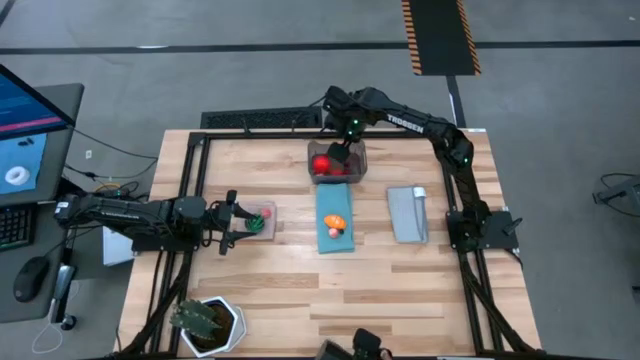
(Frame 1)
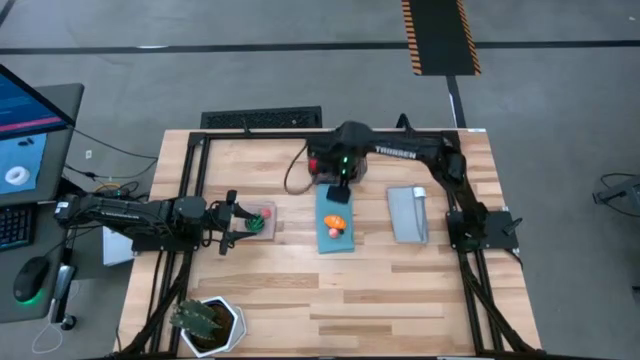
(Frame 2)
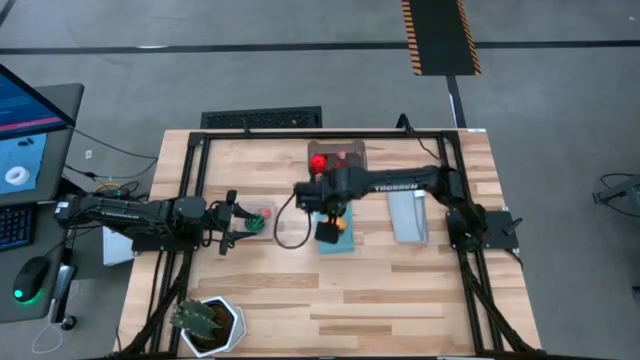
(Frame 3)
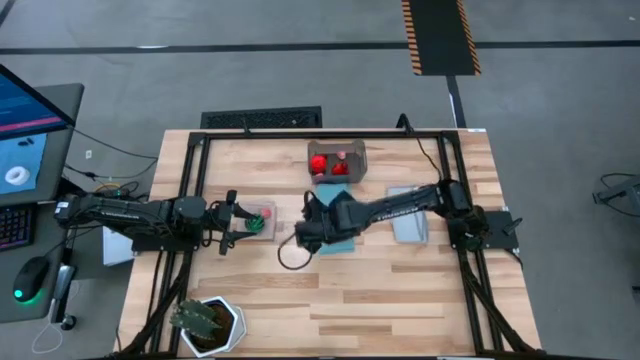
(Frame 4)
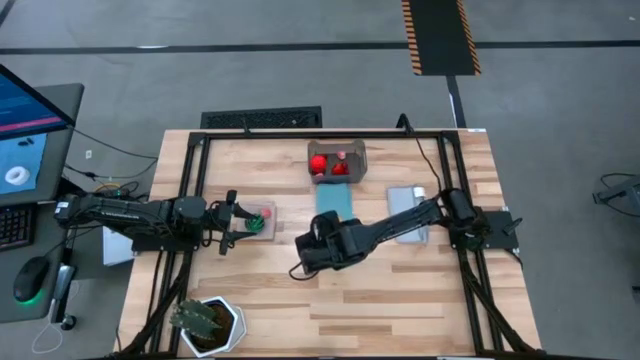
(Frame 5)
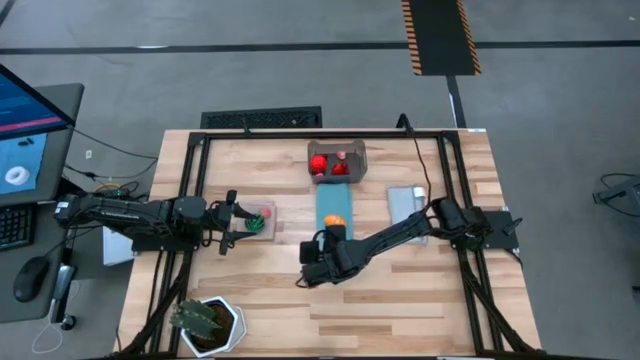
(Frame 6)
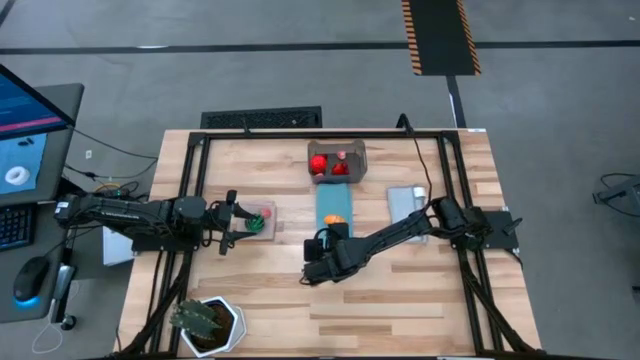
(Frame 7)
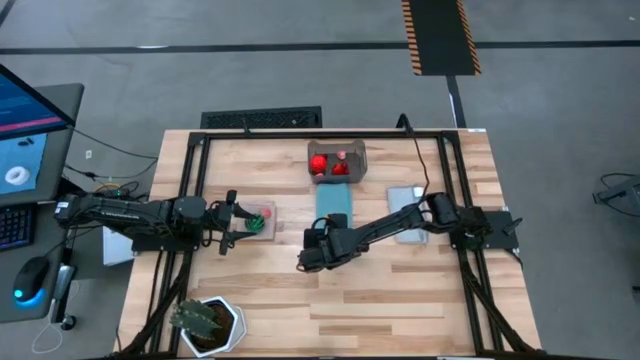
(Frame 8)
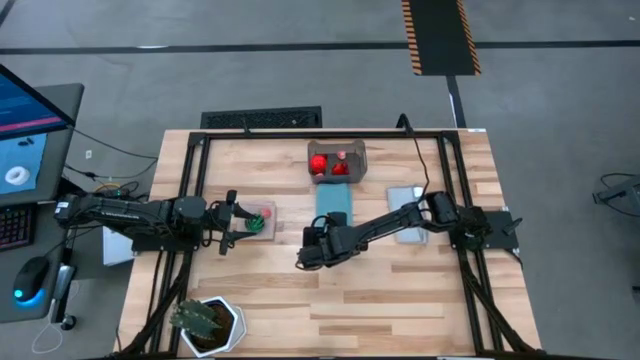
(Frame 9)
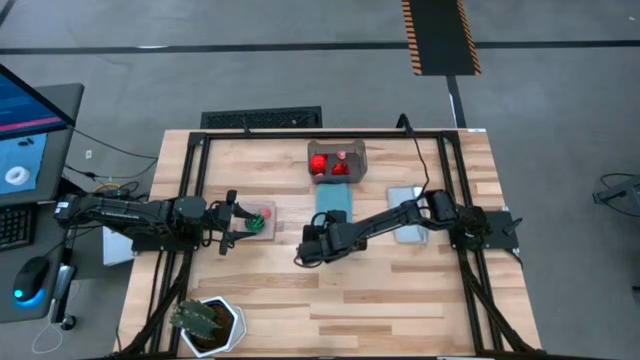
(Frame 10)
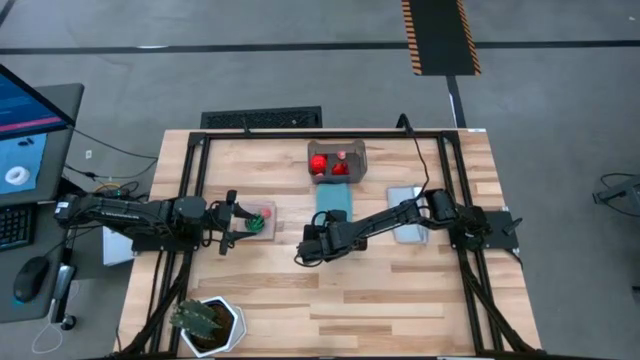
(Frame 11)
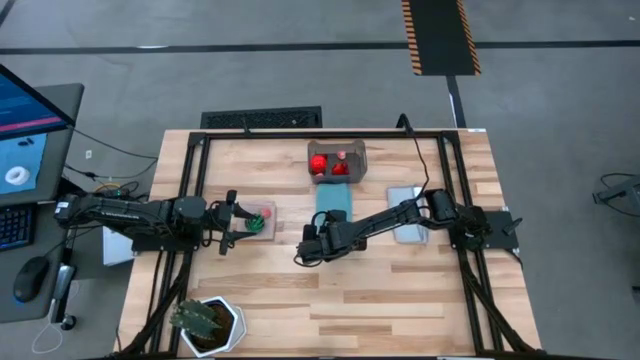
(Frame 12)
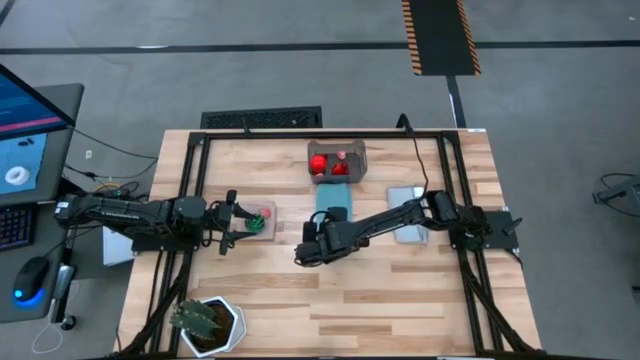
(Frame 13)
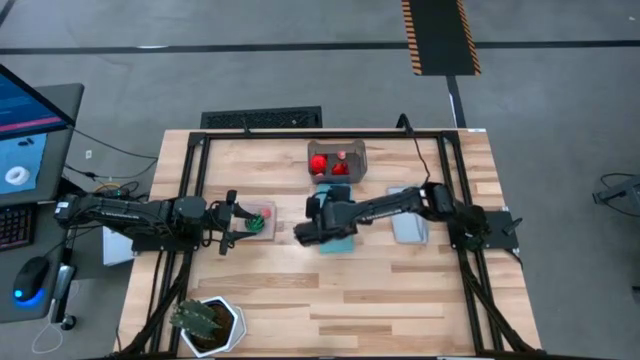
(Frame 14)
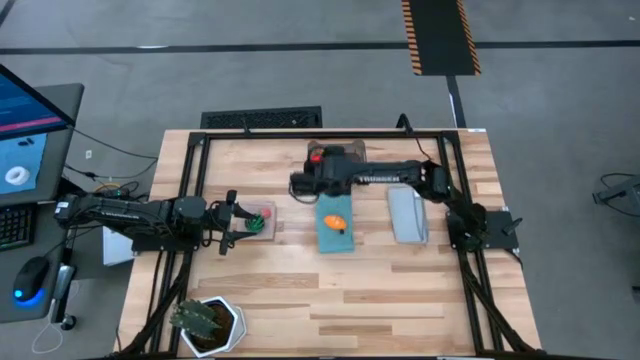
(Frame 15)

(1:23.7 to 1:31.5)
Task: Pick and placing Produce into tupperware
Put the pink peach into the gray bin

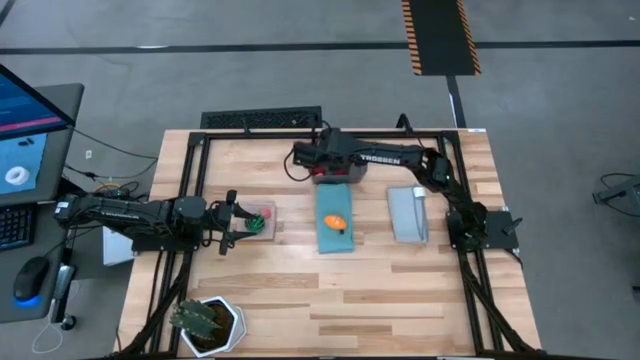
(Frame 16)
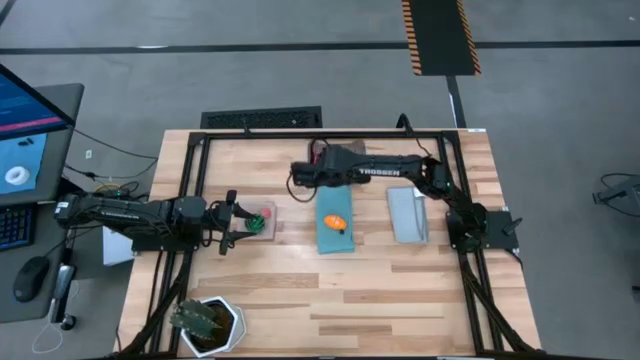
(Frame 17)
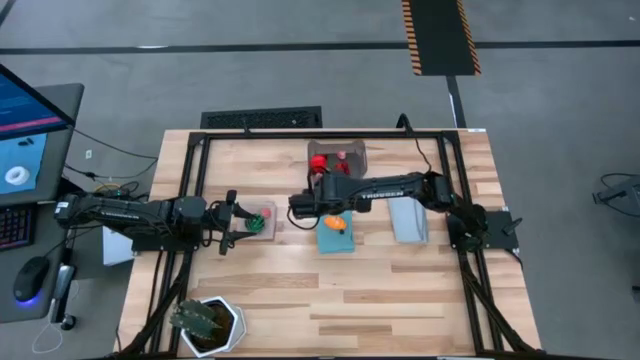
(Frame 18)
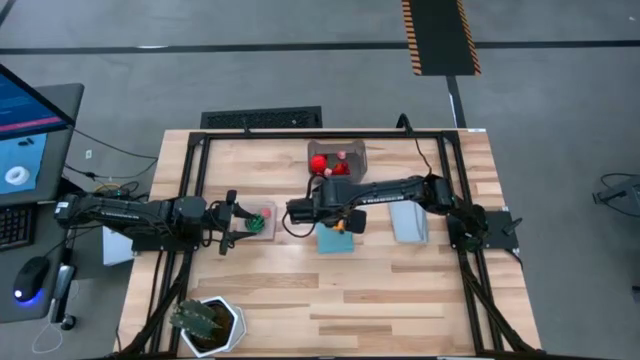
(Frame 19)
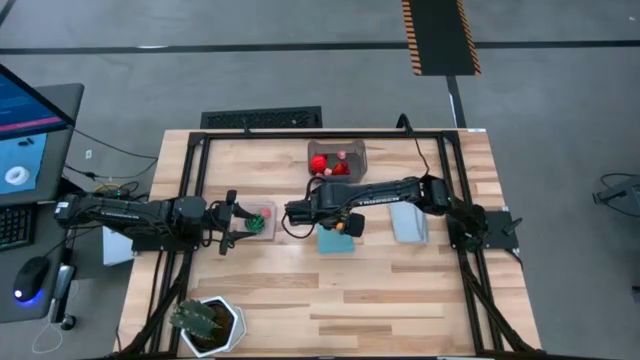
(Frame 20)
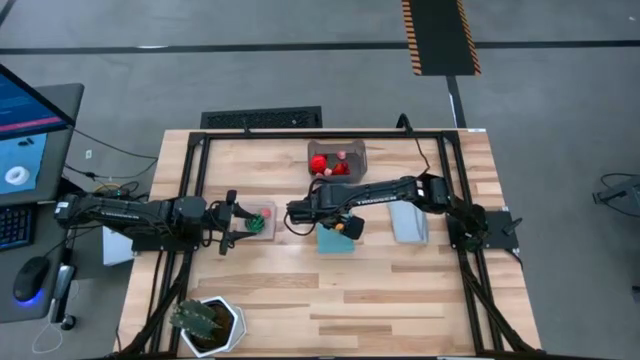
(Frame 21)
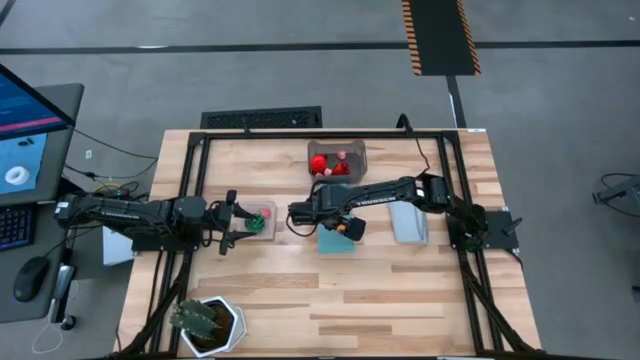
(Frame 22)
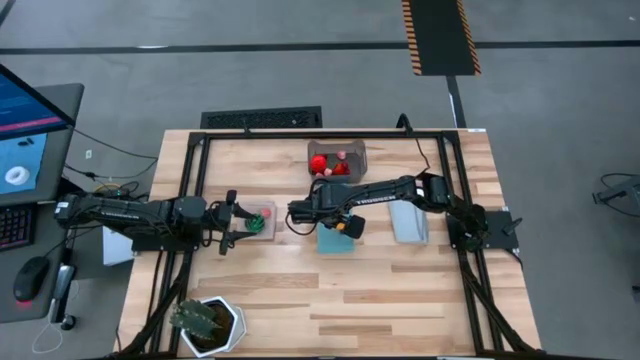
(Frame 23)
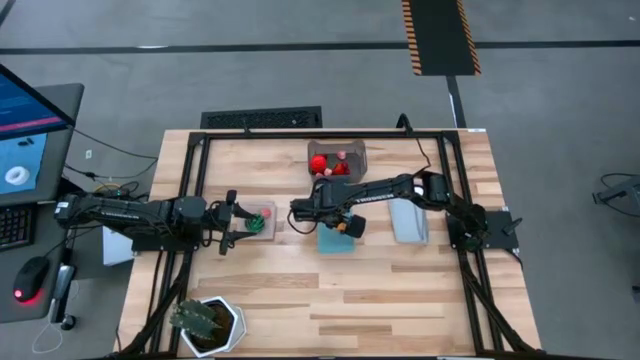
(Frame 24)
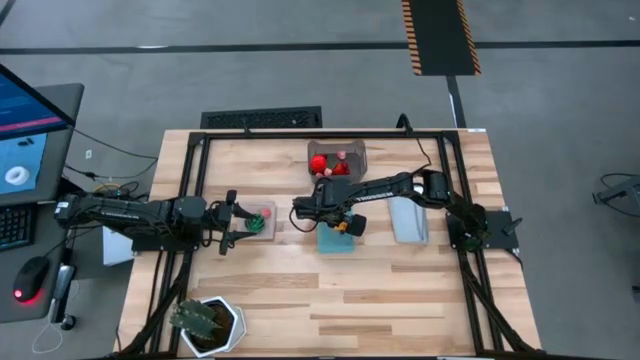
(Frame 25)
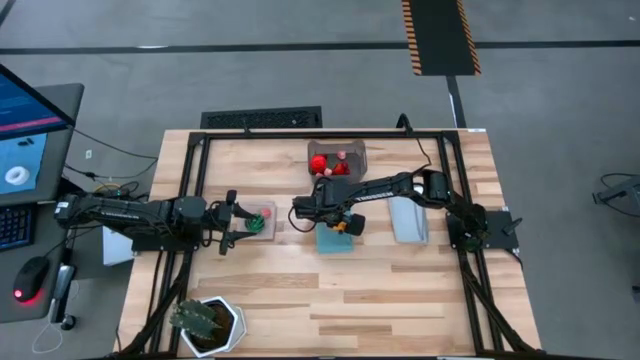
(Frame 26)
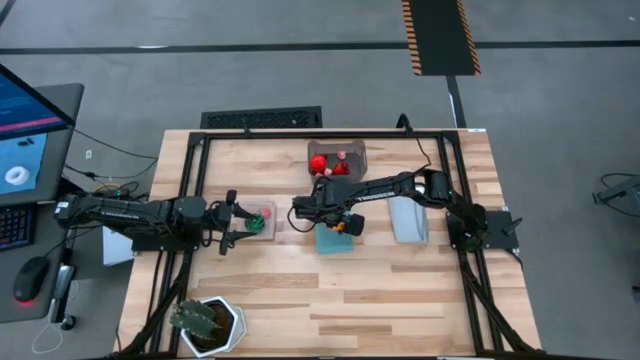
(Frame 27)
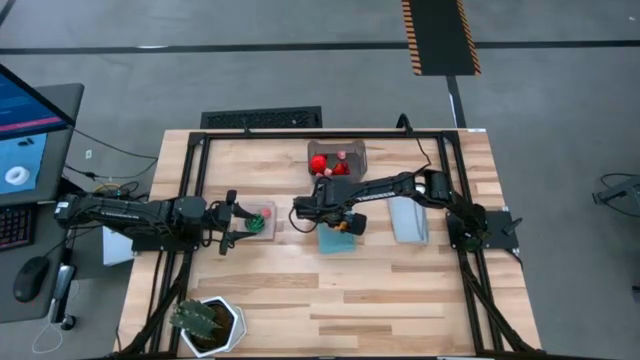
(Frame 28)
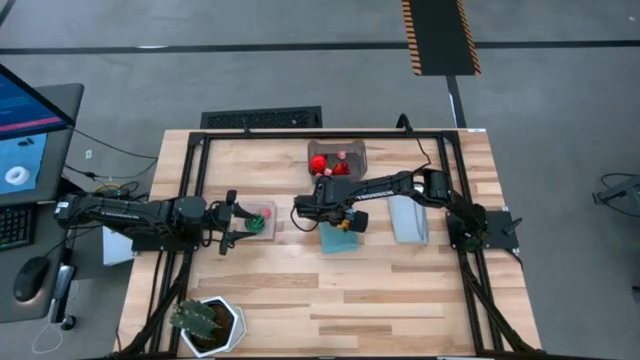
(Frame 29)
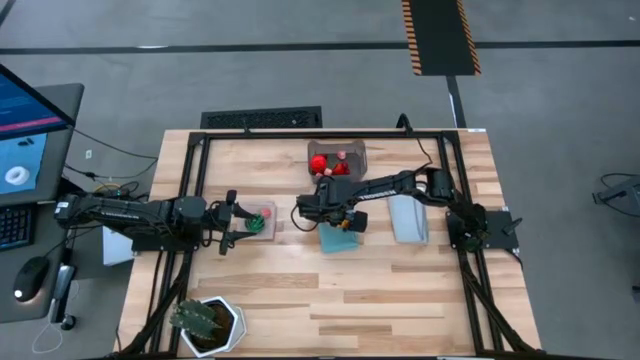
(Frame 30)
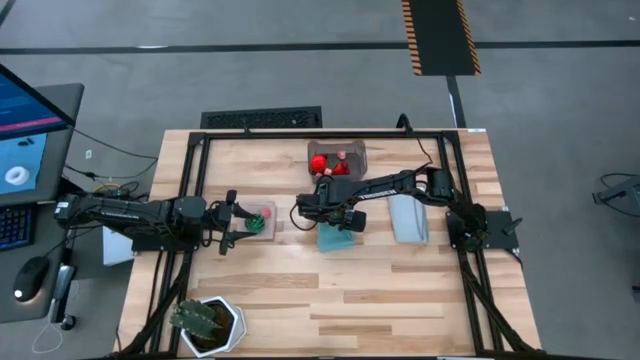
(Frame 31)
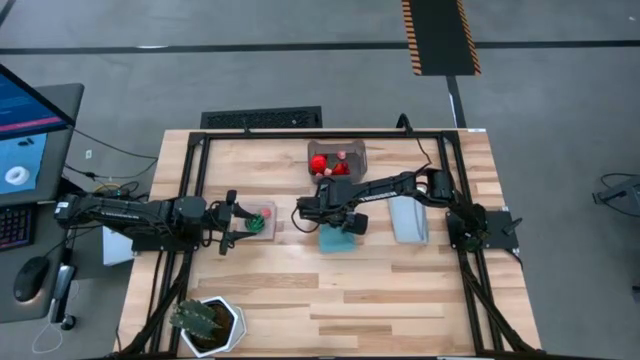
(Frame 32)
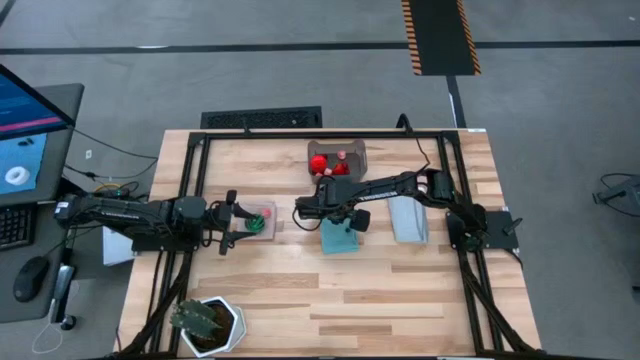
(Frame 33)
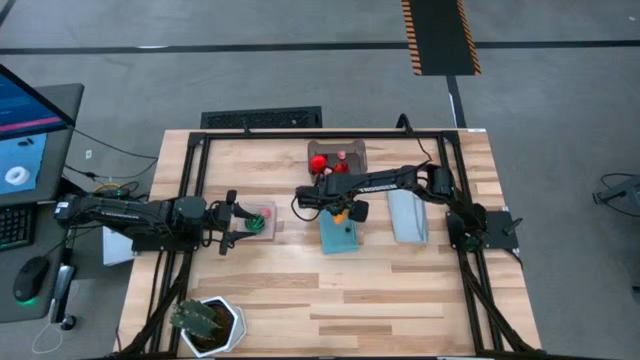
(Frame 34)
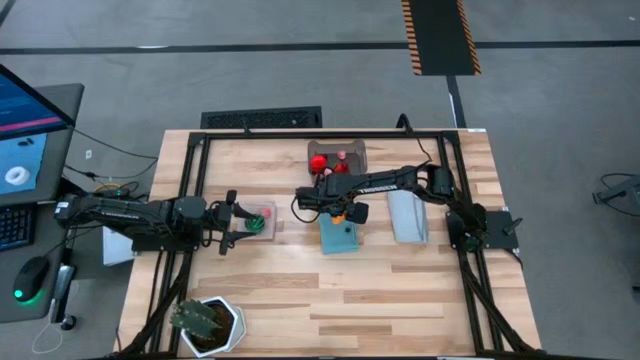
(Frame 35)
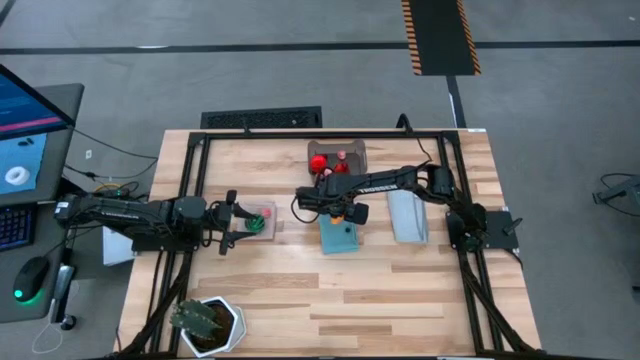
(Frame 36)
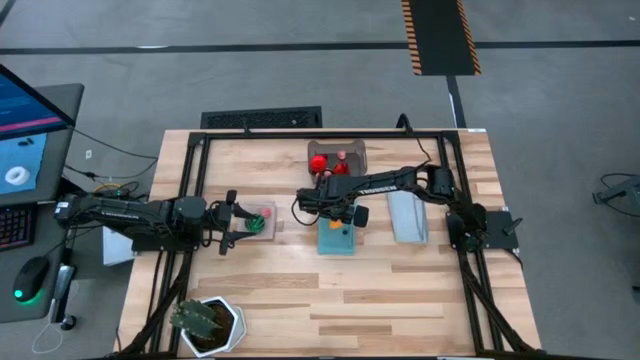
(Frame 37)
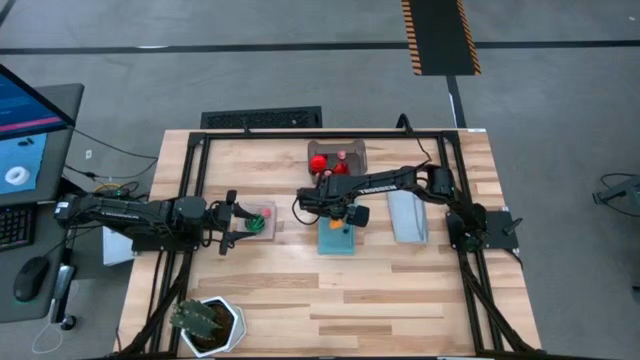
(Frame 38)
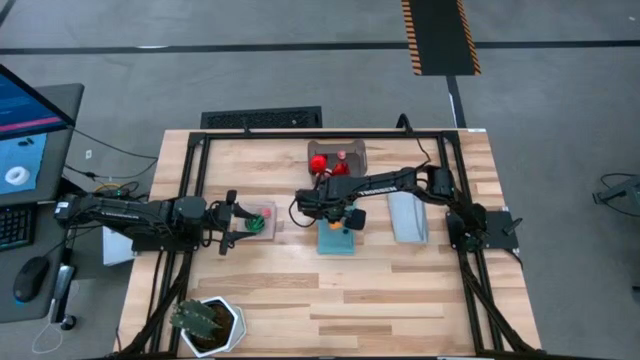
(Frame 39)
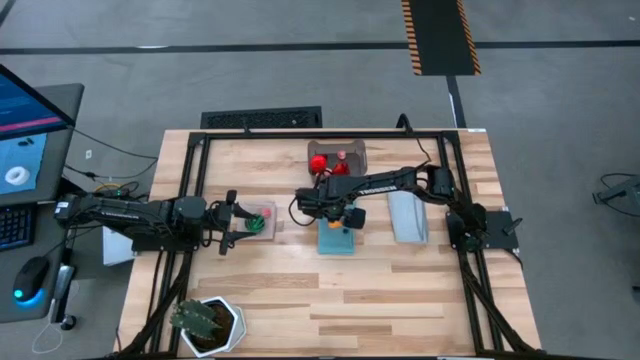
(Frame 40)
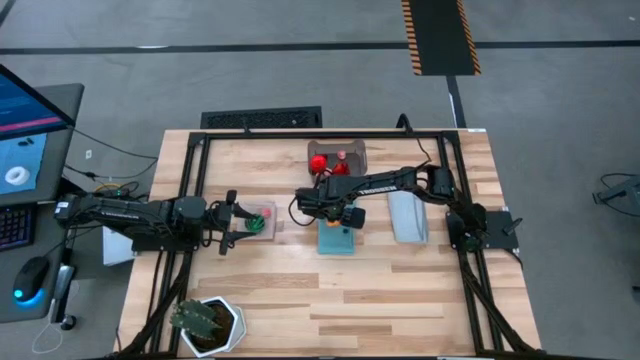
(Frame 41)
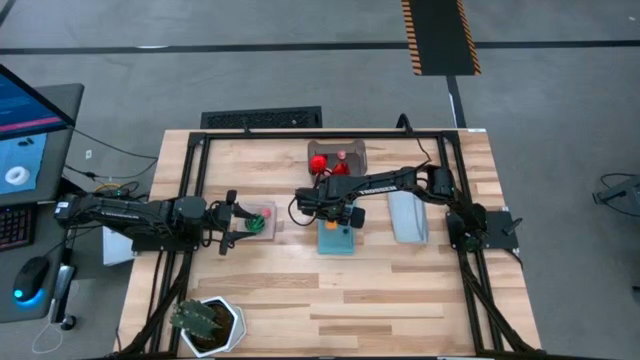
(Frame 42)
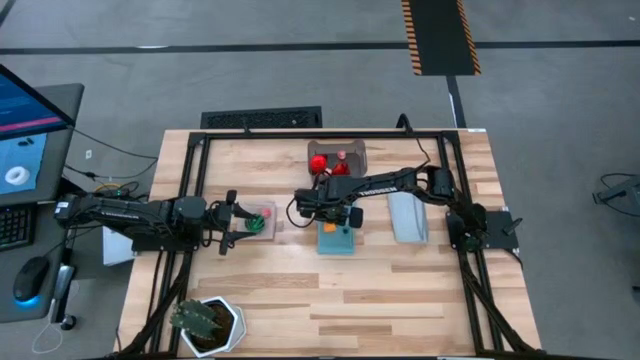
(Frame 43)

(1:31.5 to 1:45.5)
Put the yellow croissant into the gray bin
